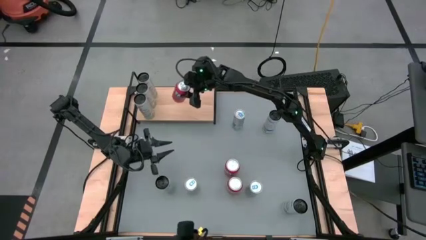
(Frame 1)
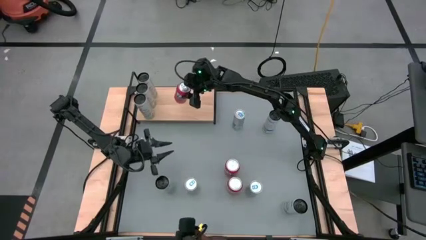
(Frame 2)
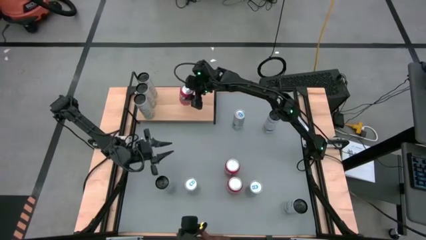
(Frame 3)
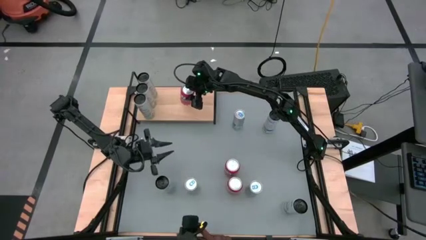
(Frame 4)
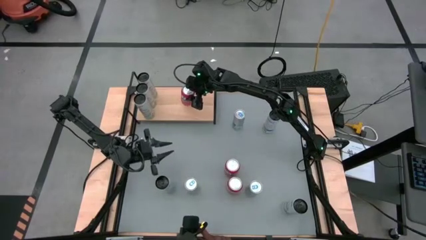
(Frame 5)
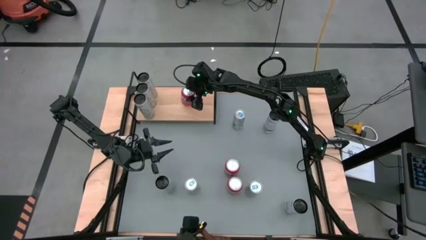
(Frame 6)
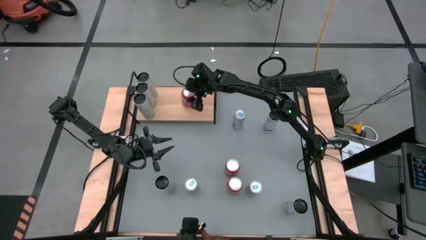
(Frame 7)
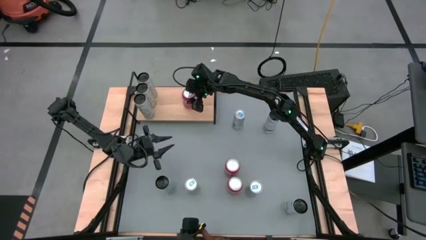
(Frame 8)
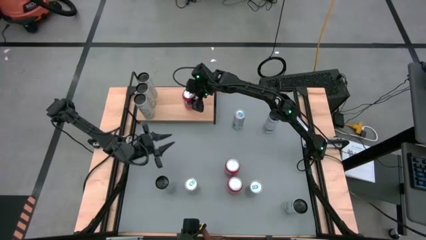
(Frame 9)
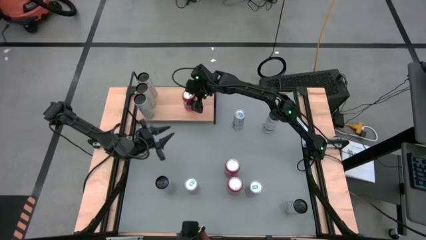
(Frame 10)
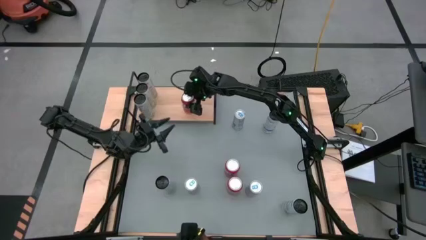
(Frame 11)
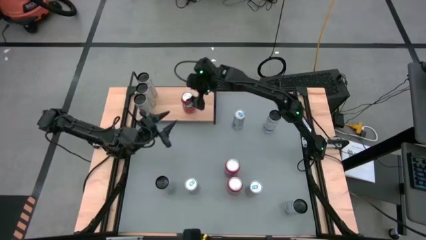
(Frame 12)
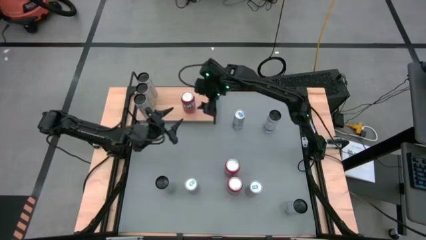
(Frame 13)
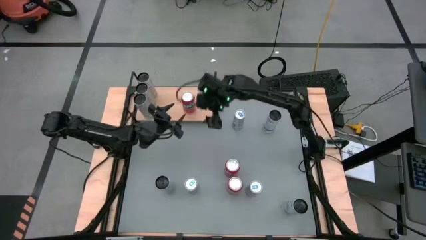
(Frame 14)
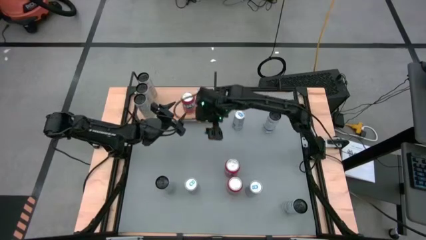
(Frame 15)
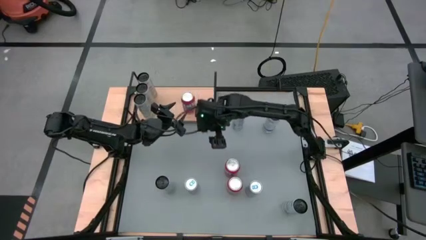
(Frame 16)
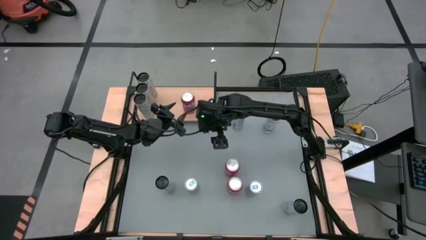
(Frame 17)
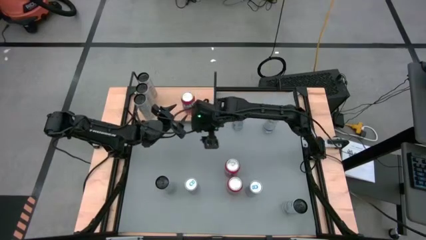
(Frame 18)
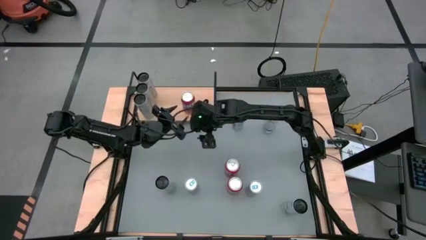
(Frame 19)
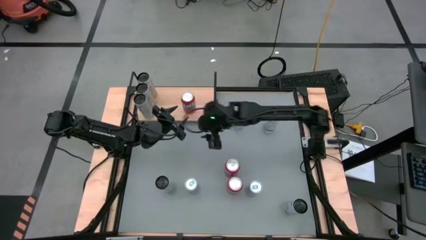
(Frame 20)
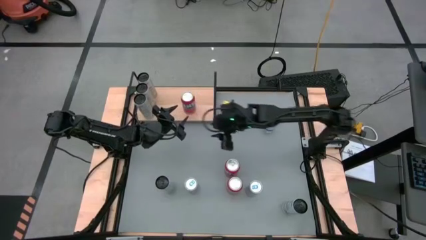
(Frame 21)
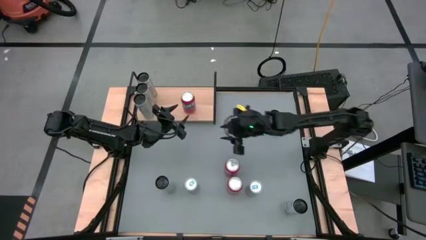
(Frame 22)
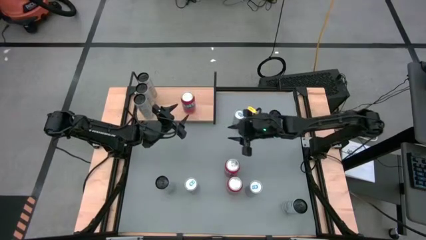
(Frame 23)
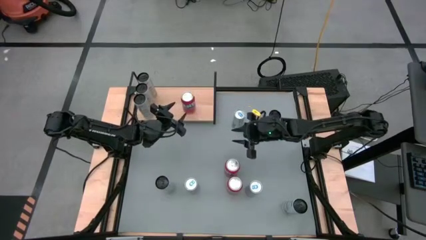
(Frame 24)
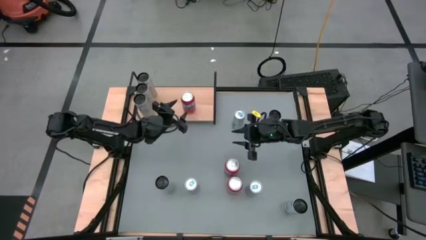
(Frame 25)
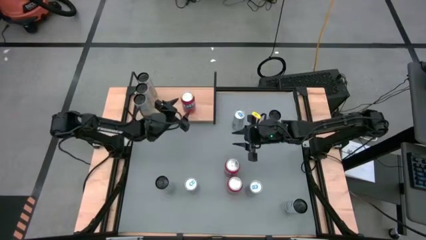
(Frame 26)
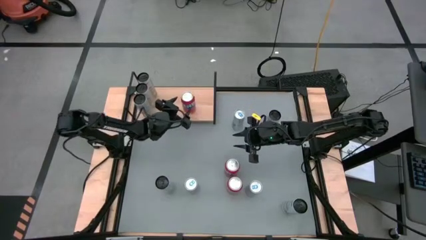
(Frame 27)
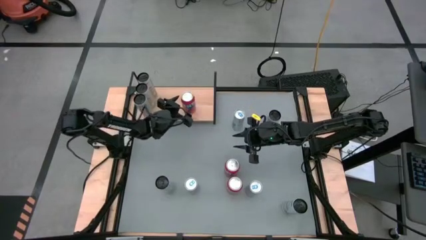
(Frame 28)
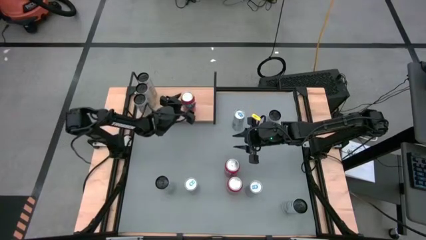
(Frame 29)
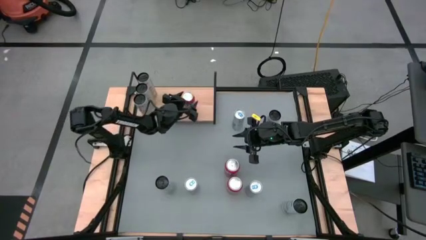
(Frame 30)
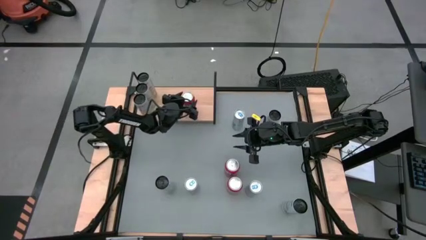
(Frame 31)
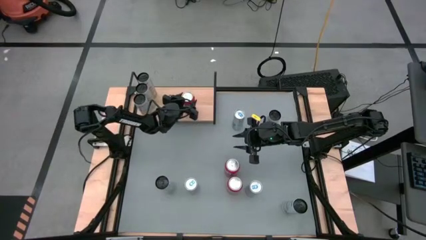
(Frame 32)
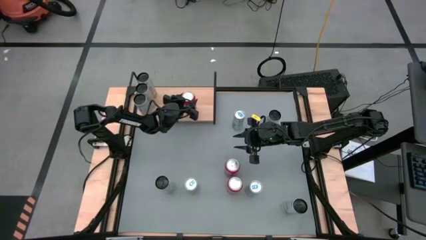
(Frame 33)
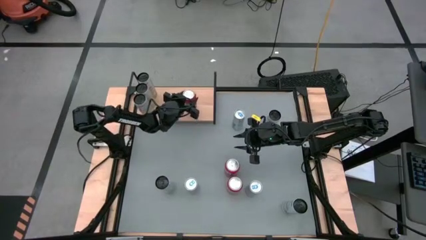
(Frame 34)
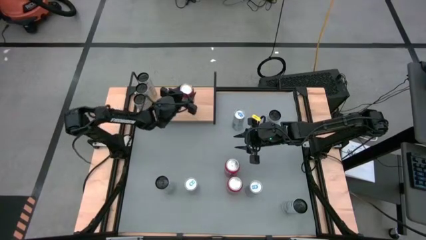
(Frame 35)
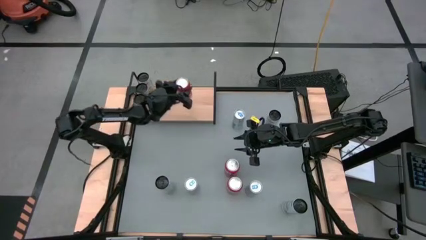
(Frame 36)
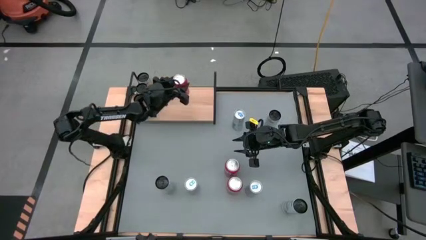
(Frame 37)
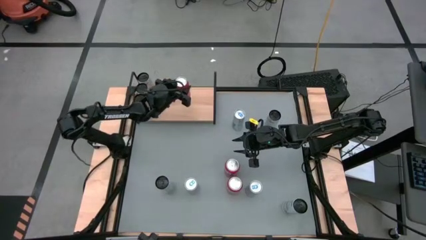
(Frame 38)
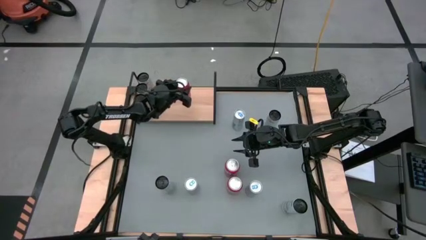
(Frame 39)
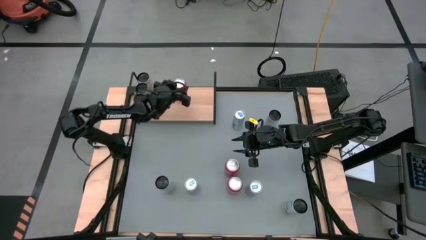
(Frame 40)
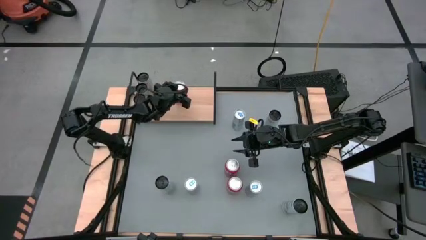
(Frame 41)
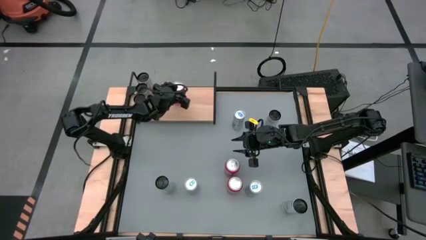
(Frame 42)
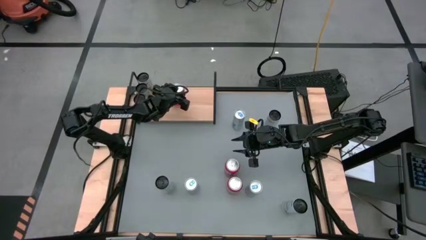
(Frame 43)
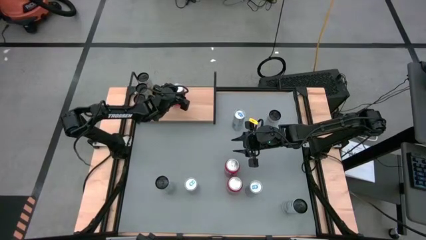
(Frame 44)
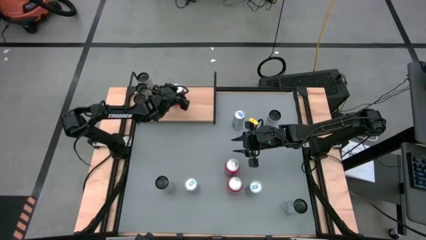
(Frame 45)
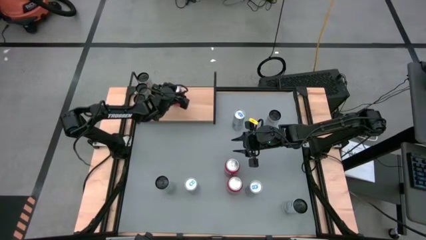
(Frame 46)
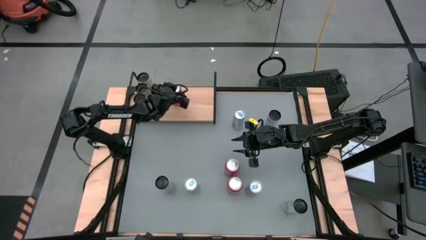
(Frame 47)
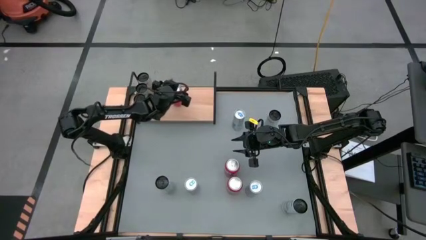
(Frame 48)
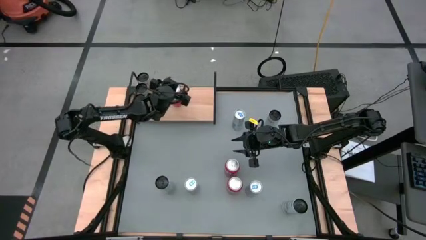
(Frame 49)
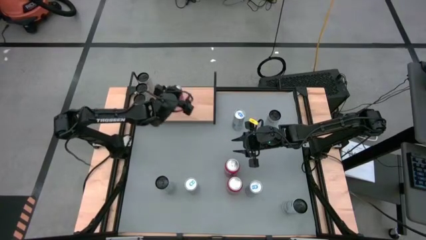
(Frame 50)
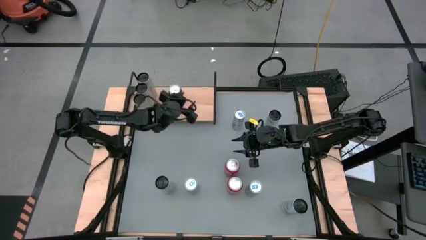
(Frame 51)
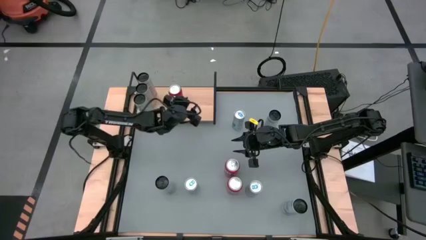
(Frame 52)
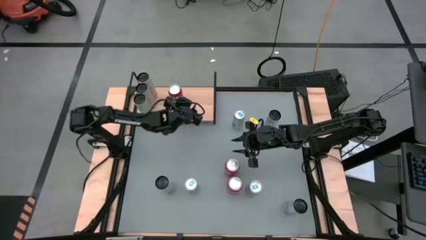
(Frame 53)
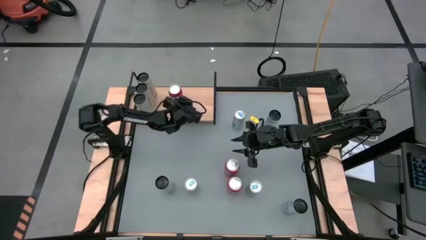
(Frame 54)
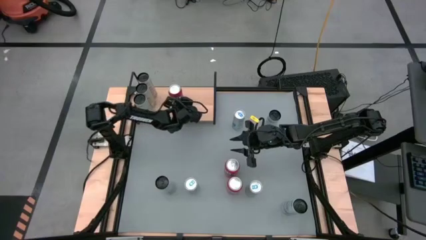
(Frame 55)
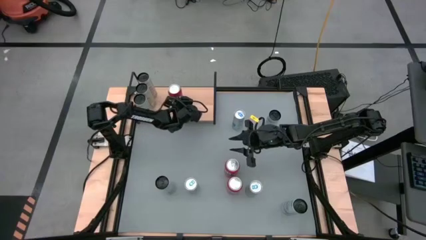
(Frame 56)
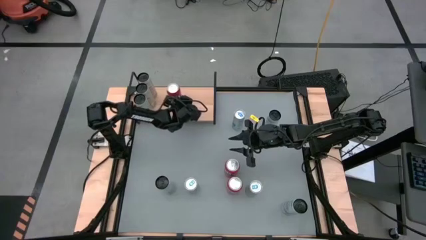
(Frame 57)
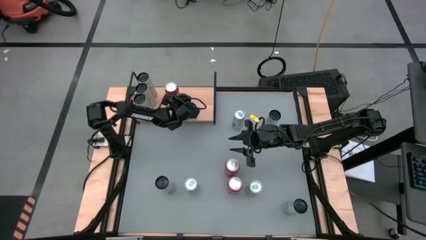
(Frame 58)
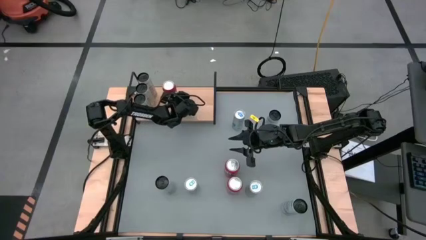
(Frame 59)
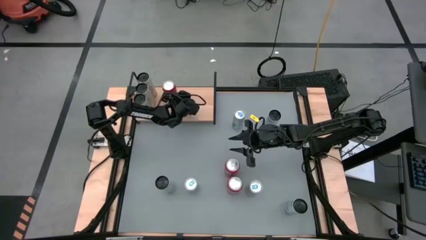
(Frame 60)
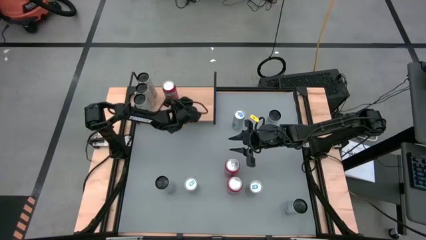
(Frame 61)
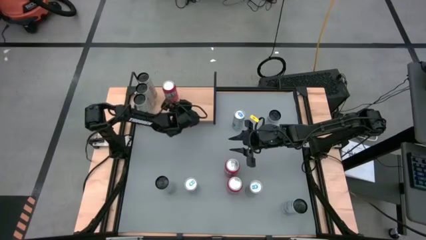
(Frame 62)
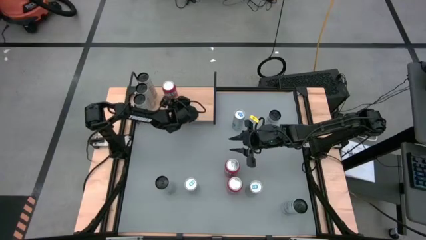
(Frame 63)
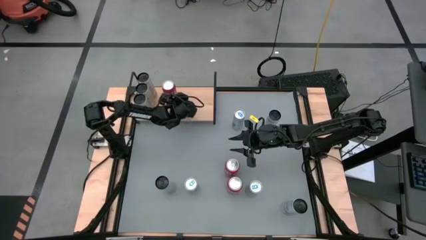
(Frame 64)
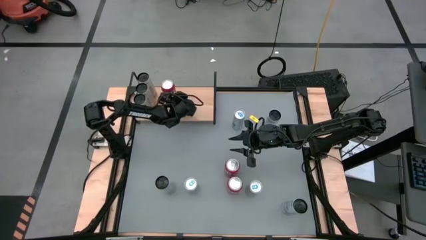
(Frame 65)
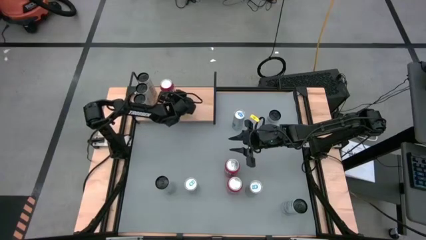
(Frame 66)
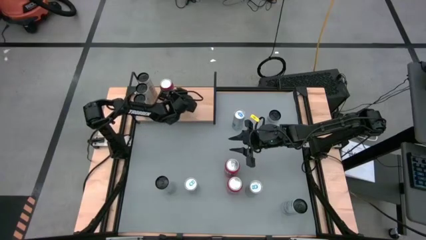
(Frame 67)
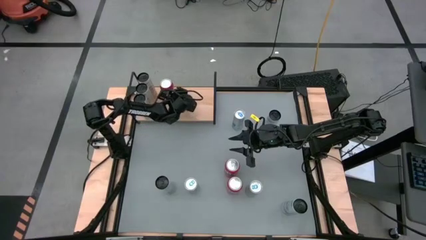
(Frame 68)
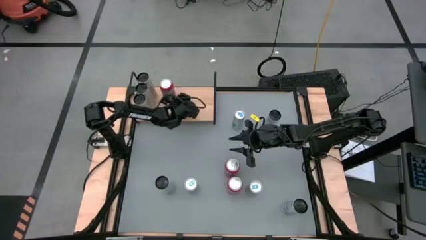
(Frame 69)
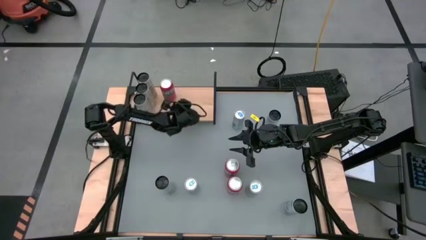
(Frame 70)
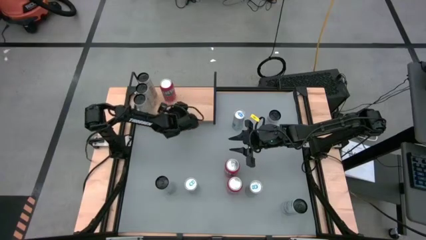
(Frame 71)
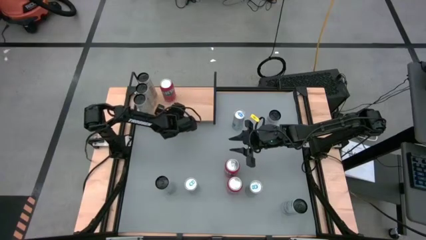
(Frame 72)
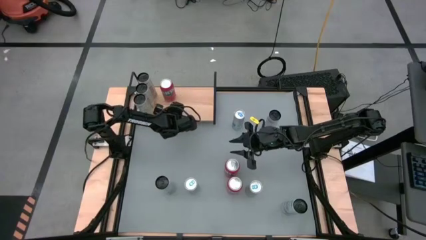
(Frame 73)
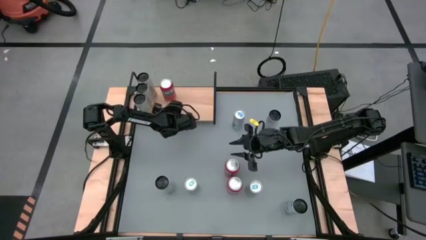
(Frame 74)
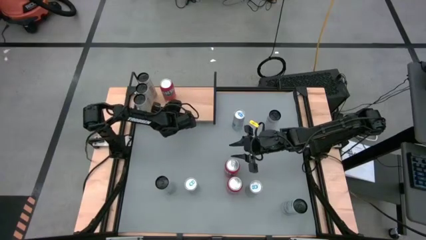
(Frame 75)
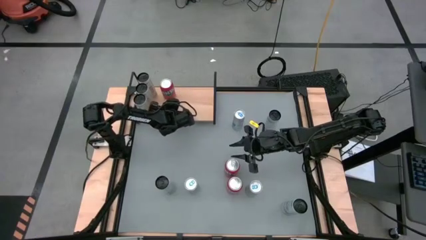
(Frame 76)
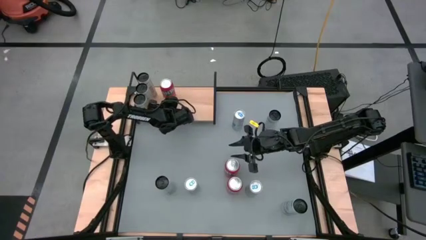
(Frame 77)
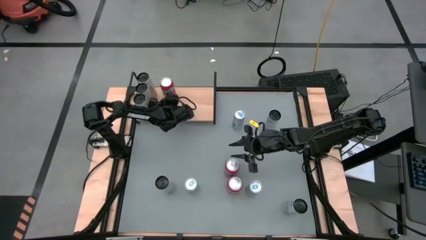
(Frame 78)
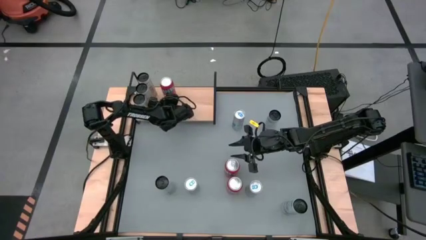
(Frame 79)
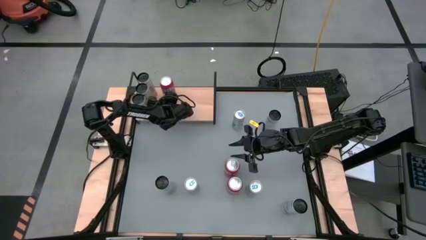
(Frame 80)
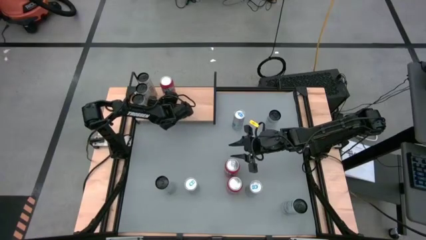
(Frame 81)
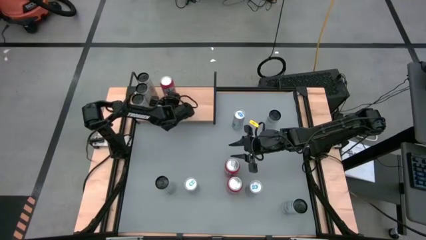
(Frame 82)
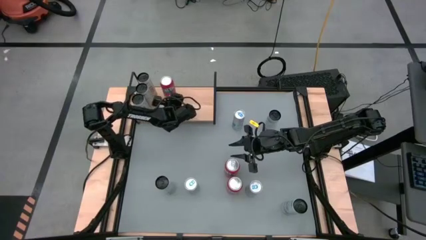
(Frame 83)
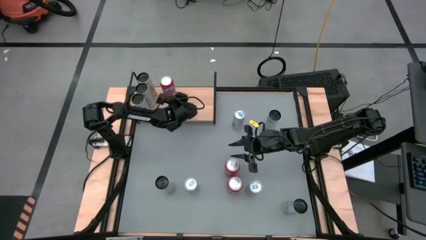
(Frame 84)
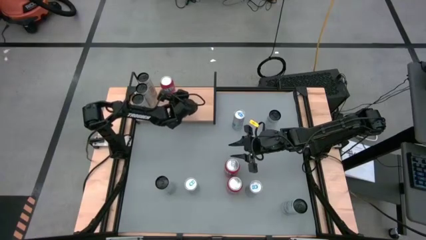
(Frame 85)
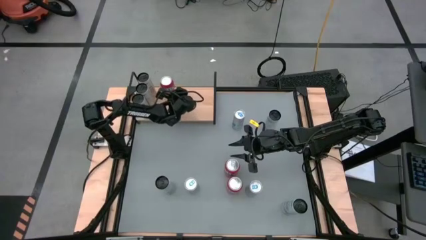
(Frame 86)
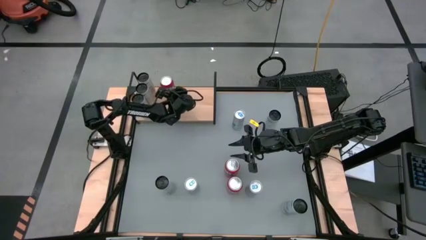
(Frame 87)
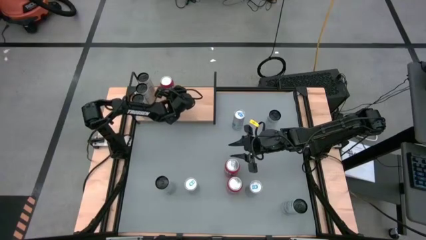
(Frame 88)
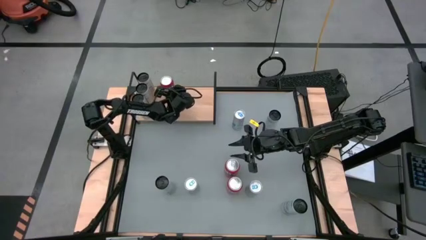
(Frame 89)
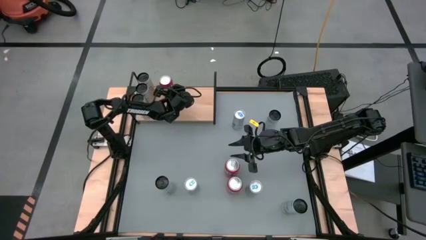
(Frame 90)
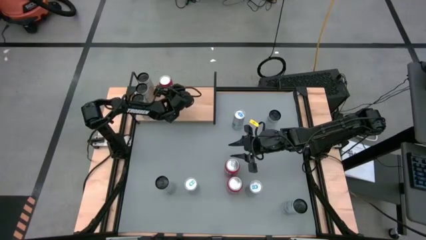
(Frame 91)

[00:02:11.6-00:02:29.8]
Task: Place canned beverage on shelf
Put the top red soda can on the shelf
